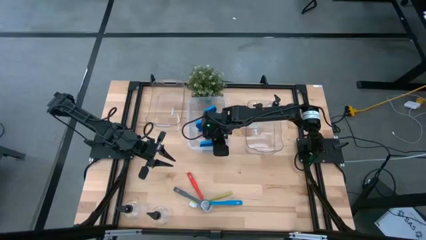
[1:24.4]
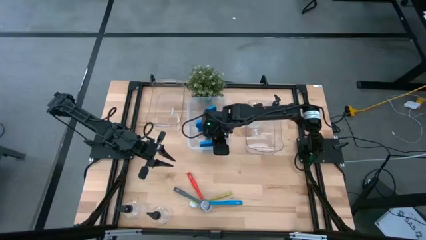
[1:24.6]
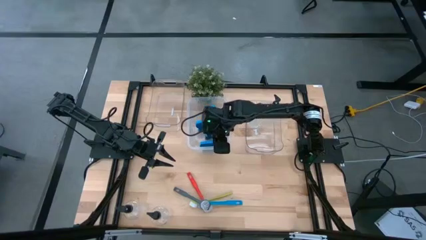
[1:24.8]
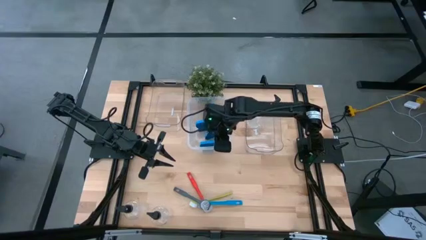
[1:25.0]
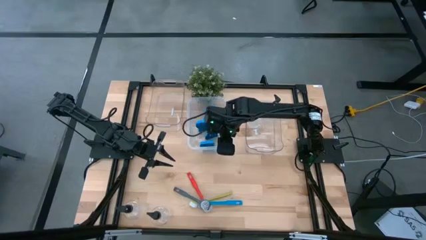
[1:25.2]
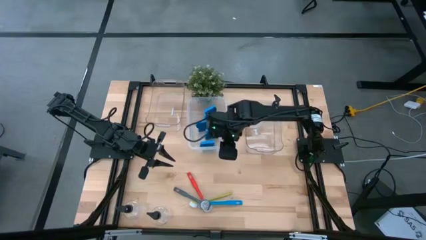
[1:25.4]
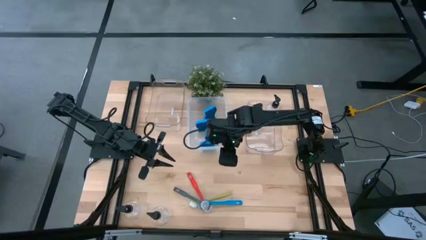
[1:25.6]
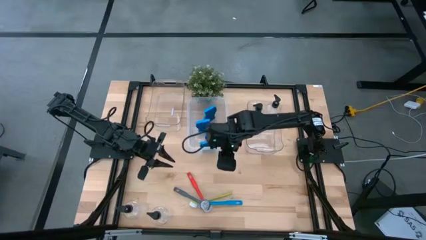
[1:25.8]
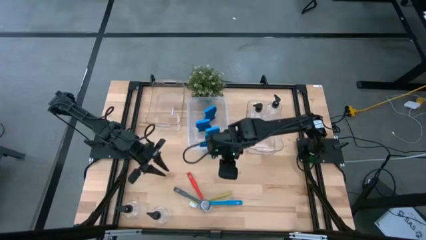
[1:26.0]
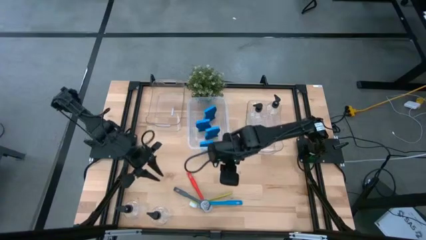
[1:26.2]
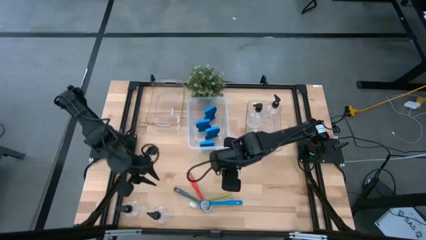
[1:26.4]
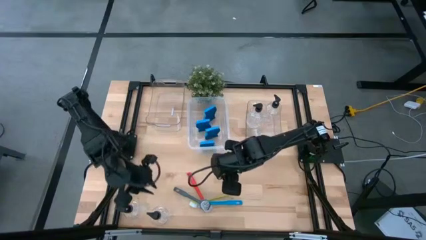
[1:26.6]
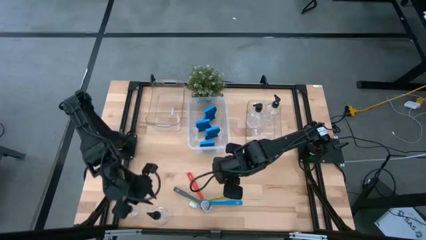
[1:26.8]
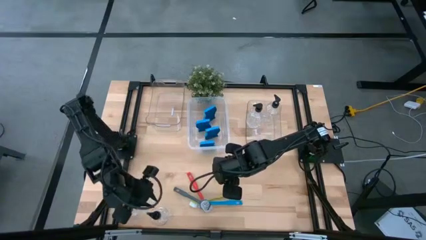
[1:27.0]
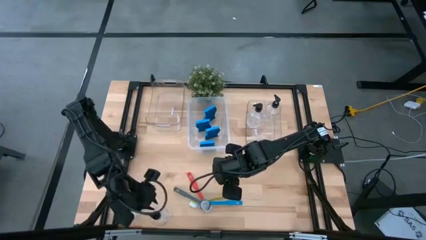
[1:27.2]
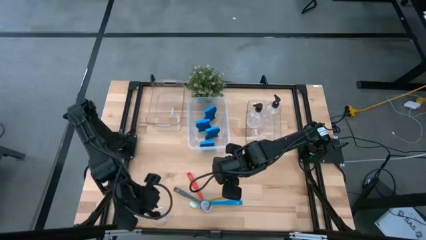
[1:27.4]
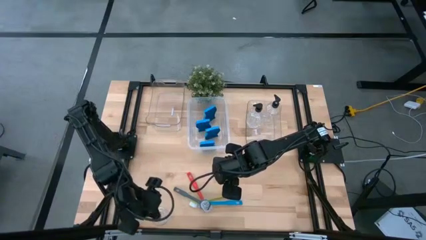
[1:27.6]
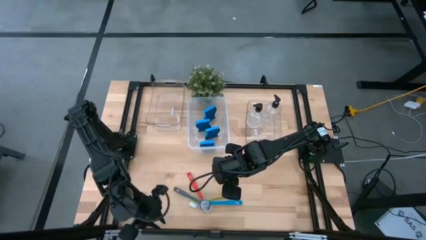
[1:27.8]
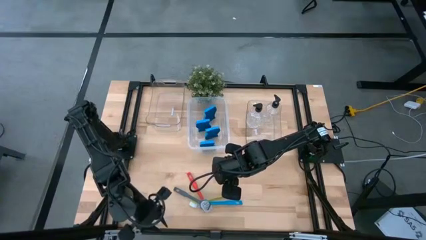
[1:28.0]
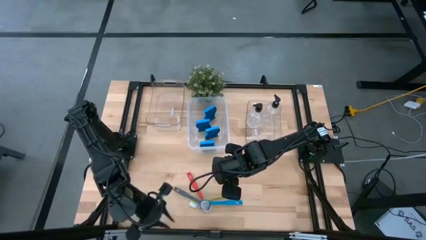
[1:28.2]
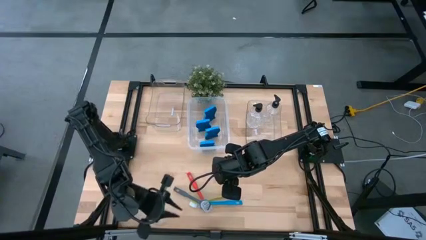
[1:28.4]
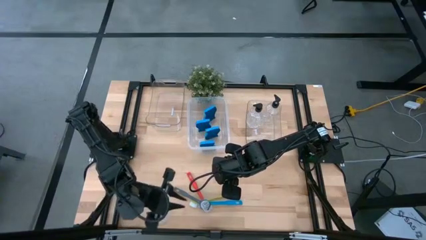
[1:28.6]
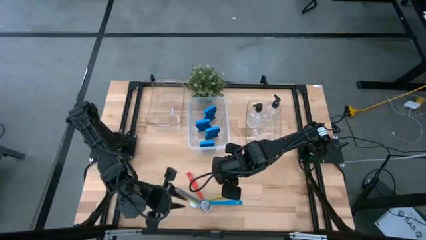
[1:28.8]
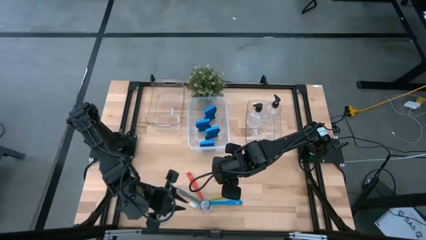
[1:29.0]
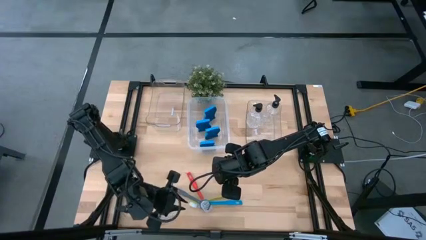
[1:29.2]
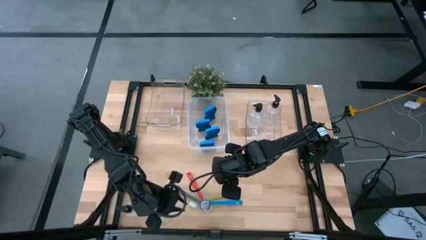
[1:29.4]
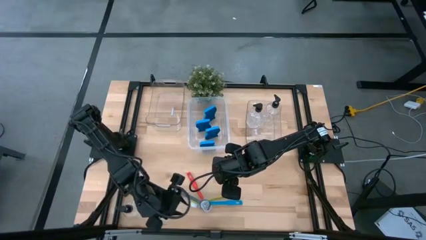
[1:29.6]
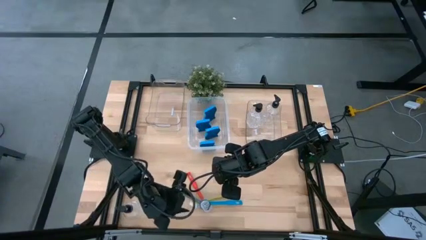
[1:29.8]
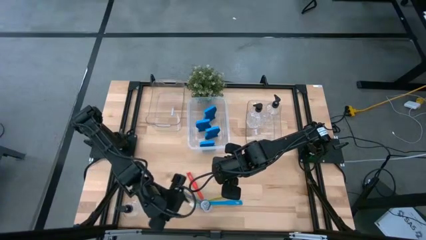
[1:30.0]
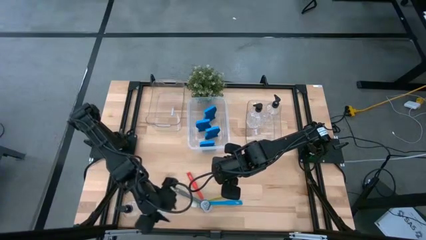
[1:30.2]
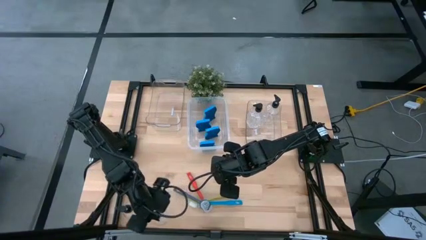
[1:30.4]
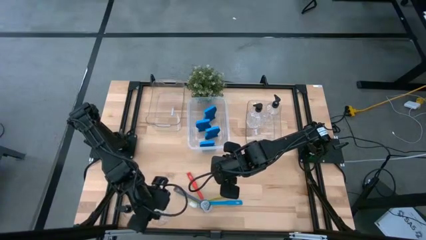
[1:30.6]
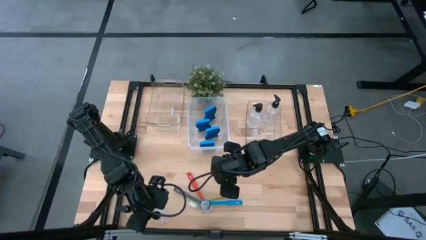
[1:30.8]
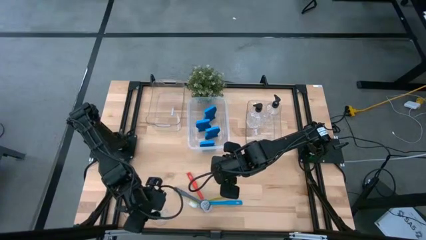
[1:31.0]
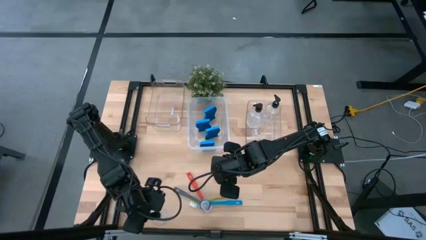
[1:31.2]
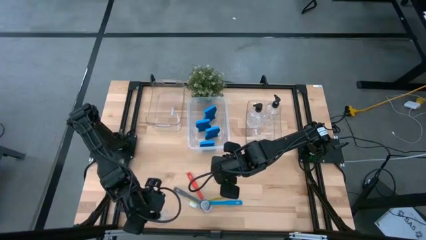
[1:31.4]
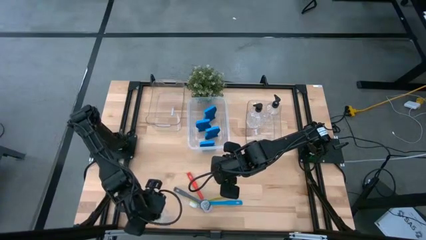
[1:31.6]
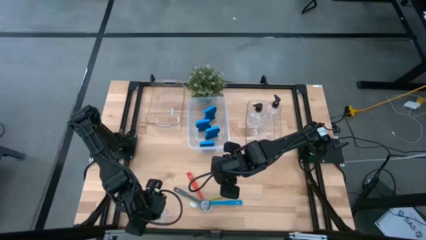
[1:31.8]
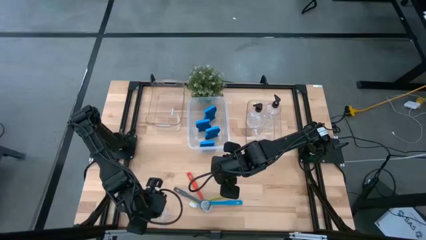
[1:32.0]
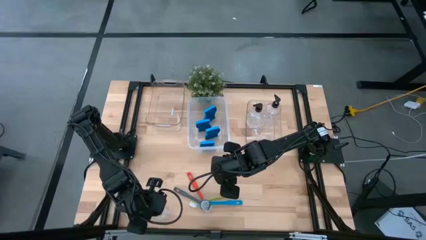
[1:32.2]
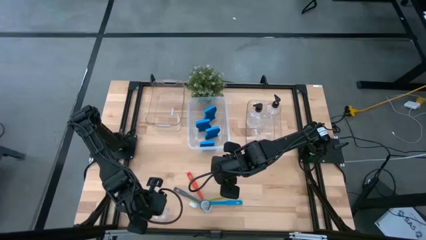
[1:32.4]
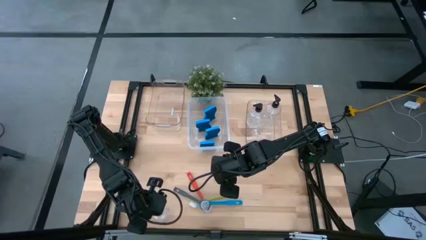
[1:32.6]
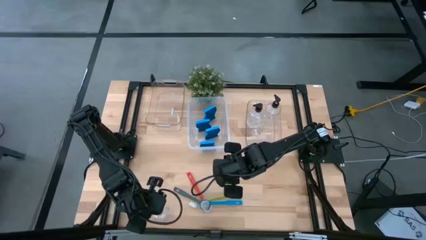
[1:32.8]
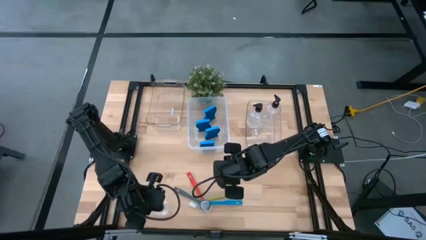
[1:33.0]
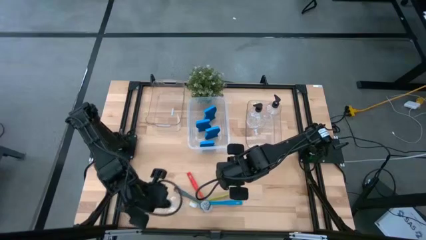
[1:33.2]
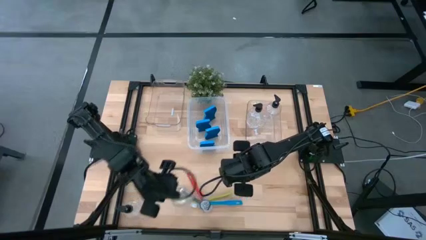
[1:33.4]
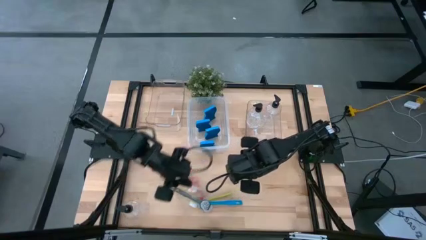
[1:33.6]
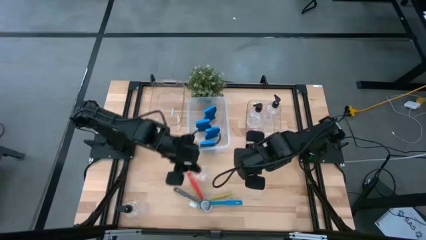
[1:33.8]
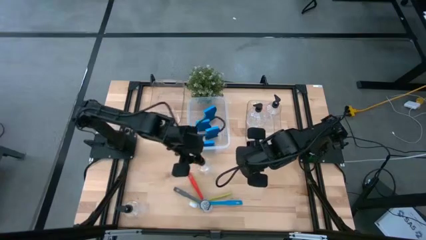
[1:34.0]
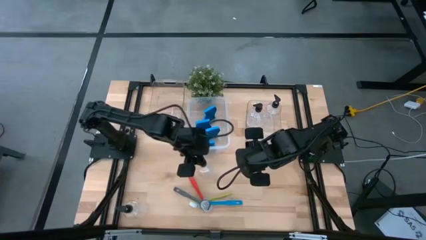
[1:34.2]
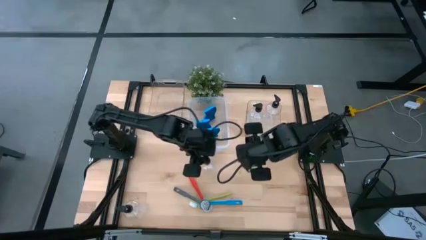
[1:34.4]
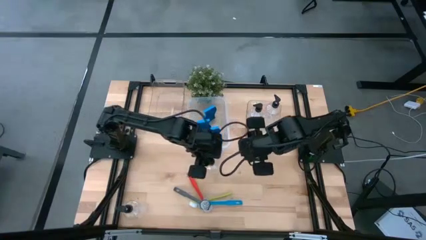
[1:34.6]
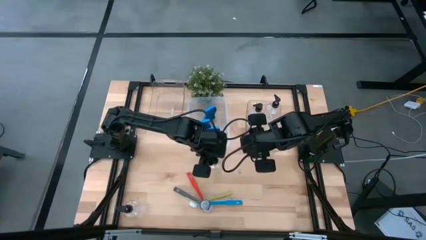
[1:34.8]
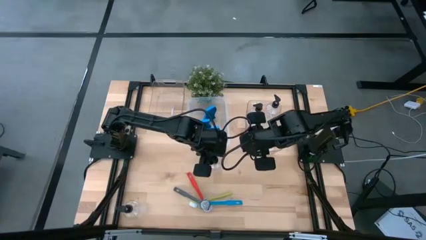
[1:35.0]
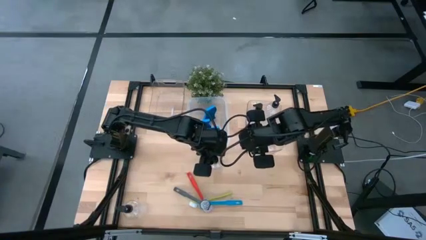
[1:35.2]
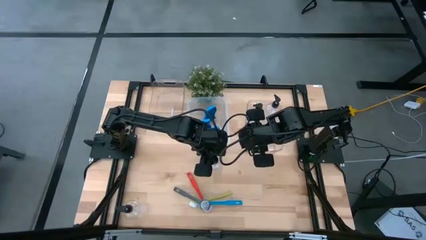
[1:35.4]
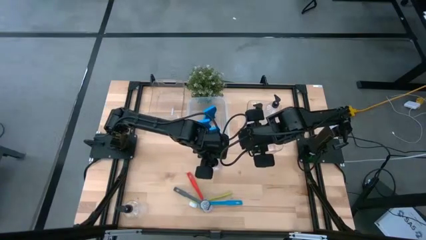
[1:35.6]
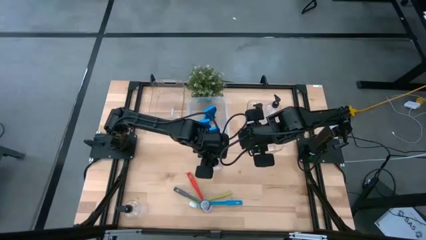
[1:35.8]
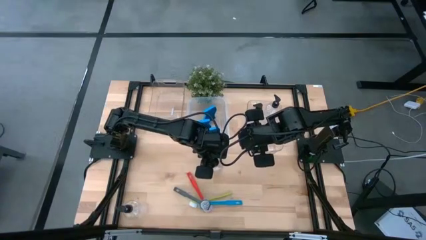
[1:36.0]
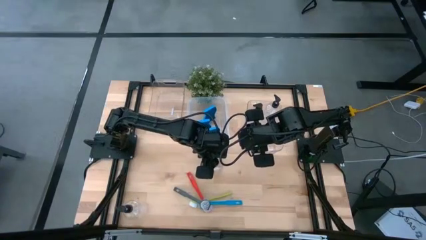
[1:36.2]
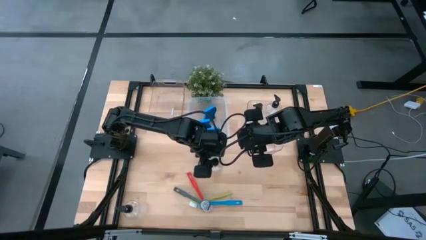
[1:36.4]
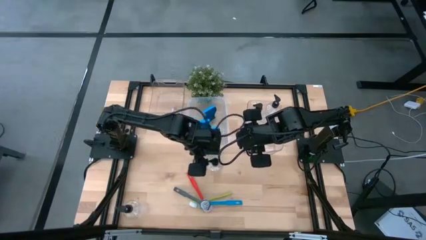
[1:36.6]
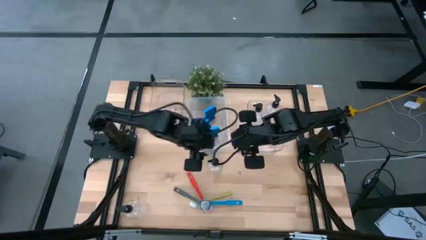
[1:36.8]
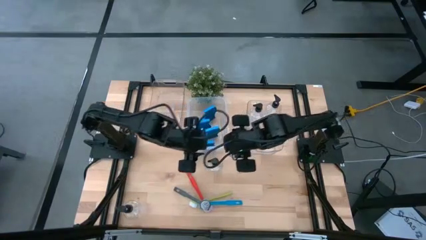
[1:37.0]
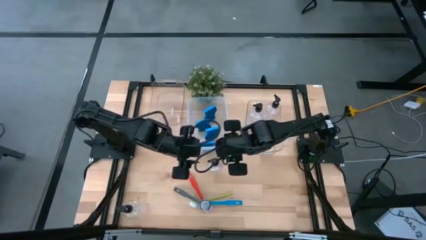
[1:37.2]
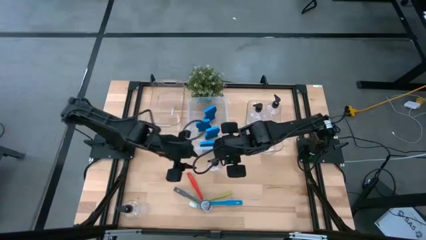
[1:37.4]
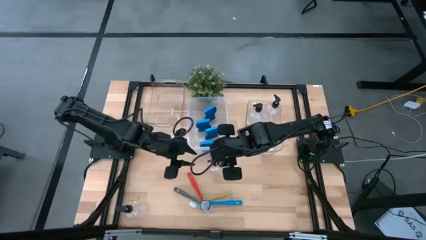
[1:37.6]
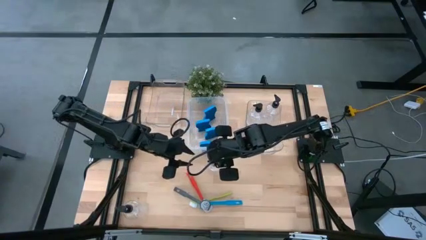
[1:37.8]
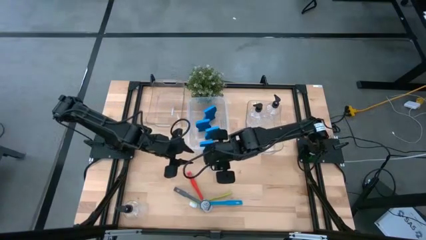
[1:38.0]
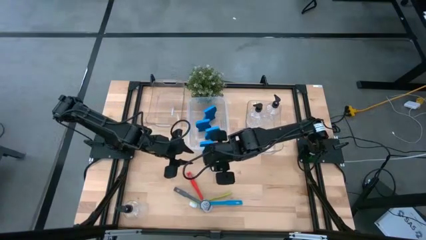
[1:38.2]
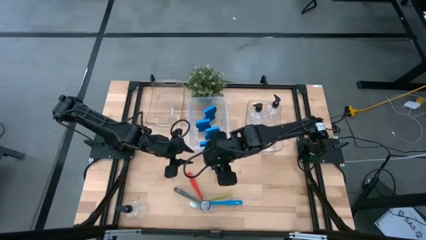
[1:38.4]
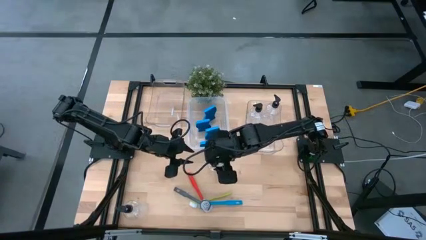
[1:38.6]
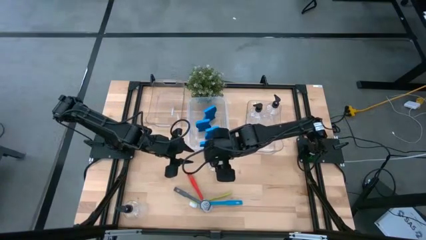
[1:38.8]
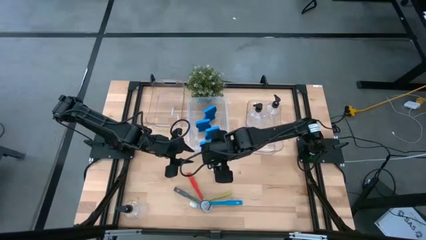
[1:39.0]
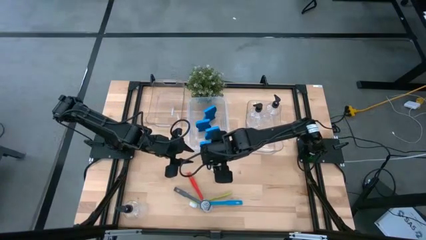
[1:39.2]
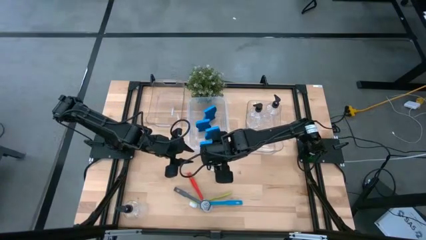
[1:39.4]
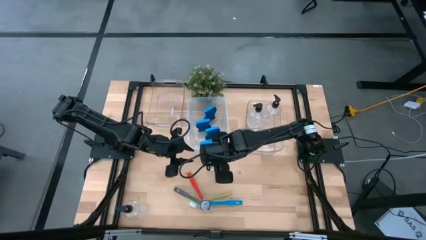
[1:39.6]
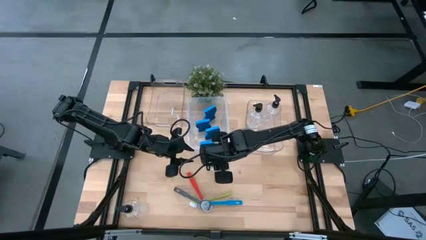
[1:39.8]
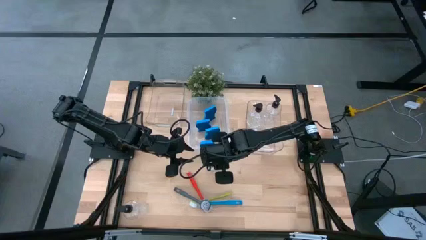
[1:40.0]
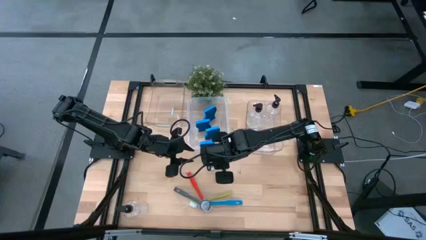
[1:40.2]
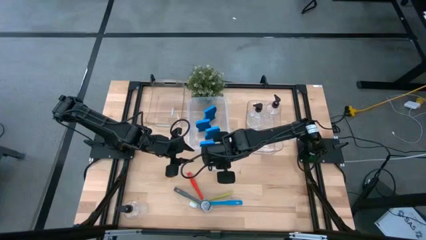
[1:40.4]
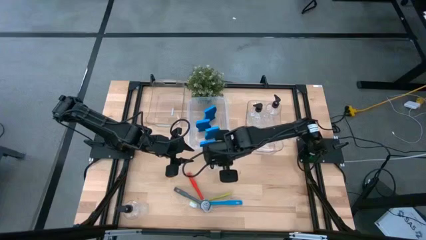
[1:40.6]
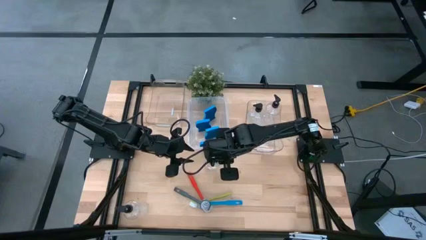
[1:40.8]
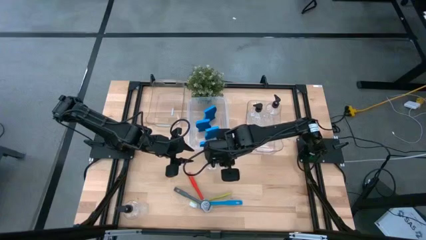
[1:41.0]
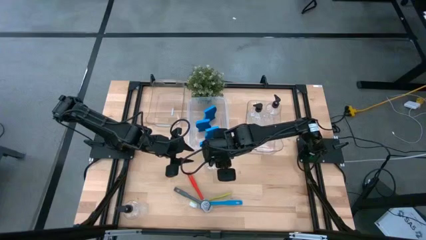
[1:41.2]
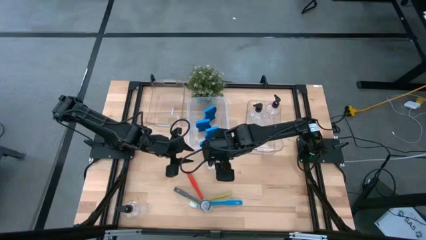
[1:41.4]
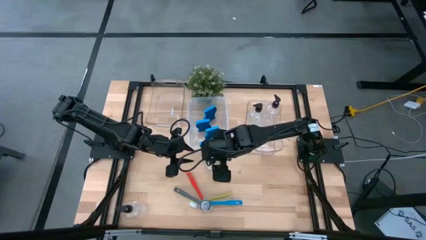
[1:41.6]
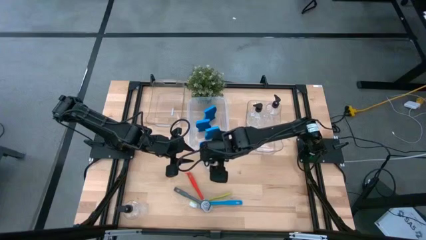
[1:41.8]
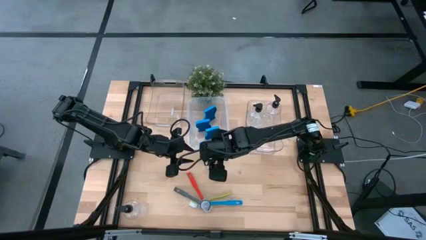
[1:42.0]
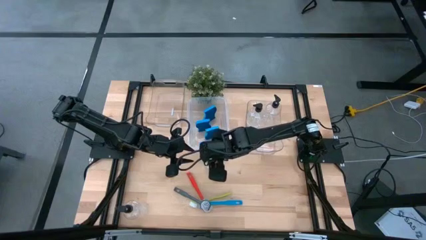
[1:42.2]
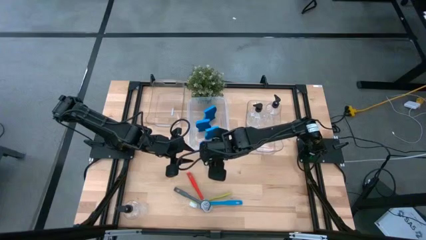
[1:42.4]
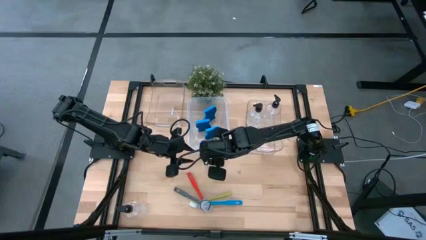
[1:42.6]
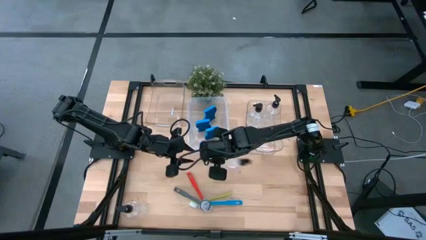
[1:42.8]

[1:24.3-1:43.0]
Task: Pick & Place Kitchen Sink Supplies
Put the transparent bottle into the right transparent bin
